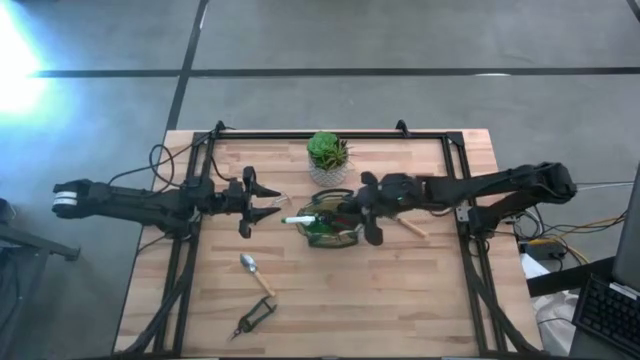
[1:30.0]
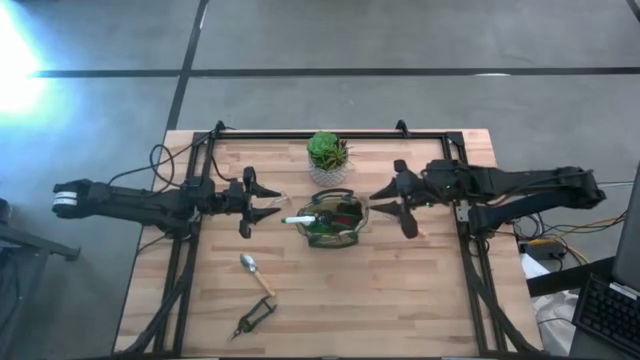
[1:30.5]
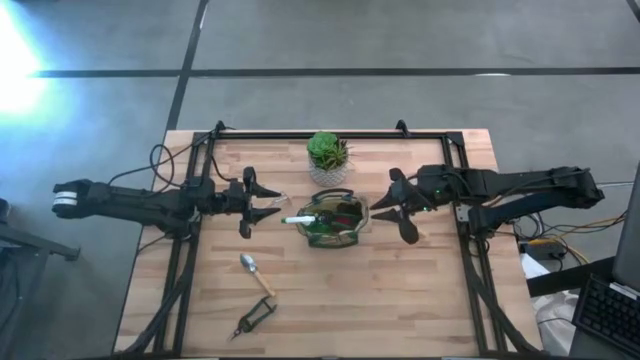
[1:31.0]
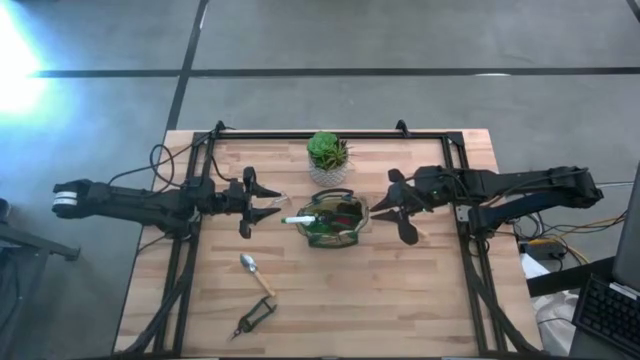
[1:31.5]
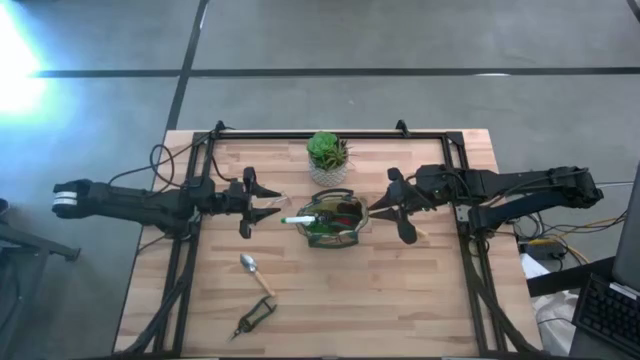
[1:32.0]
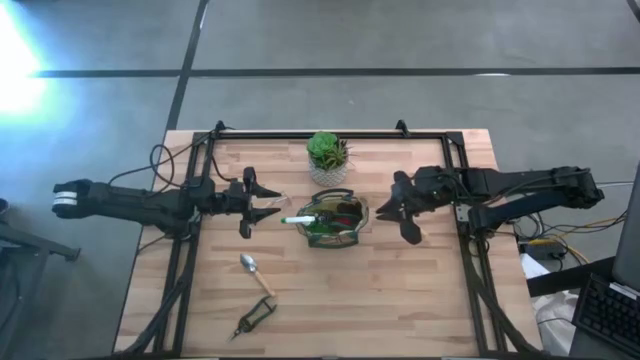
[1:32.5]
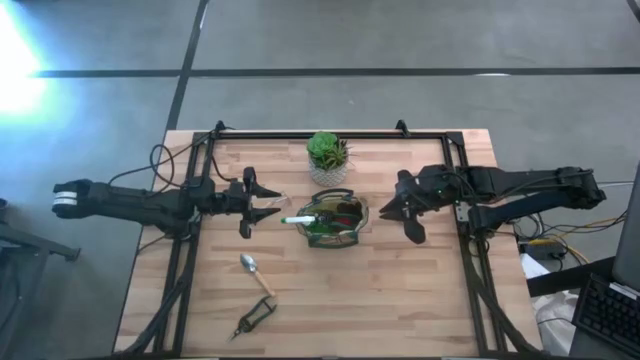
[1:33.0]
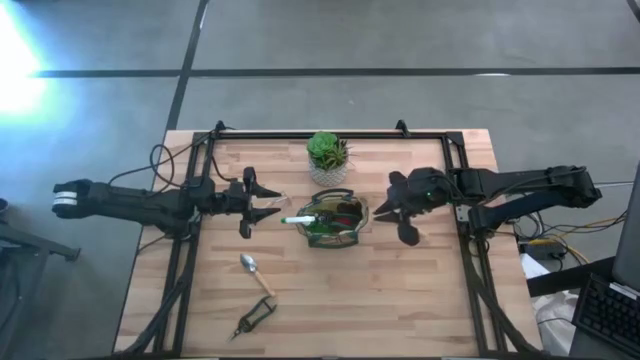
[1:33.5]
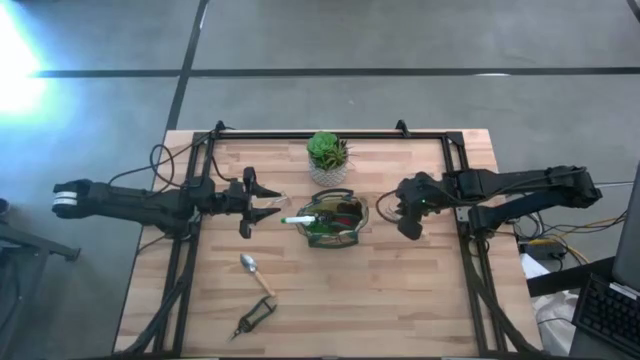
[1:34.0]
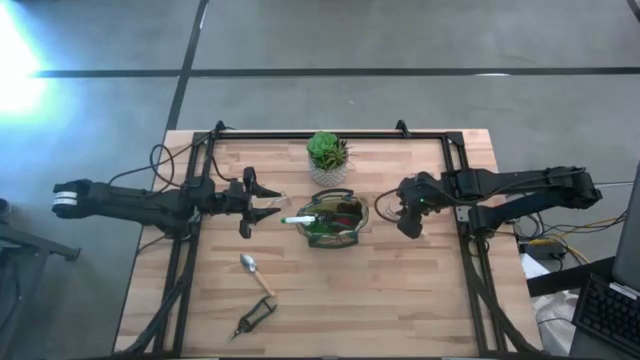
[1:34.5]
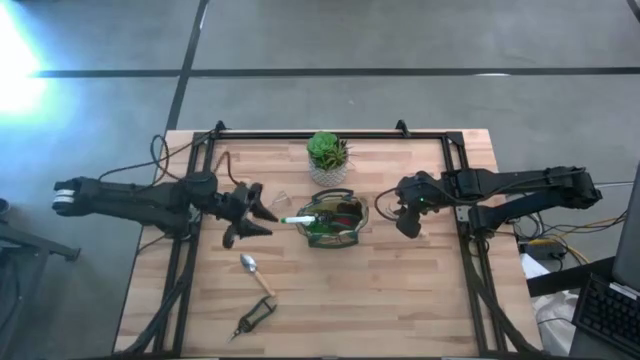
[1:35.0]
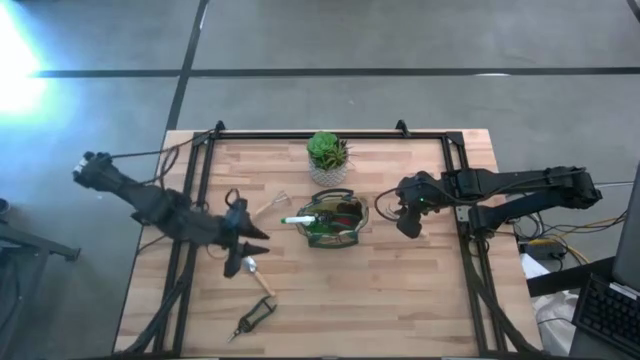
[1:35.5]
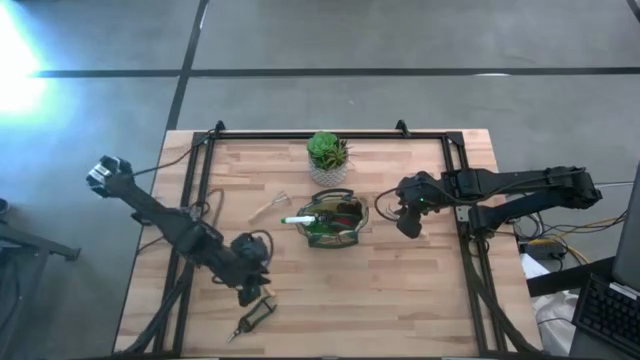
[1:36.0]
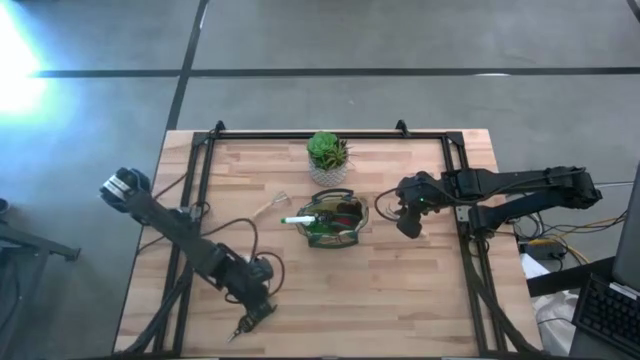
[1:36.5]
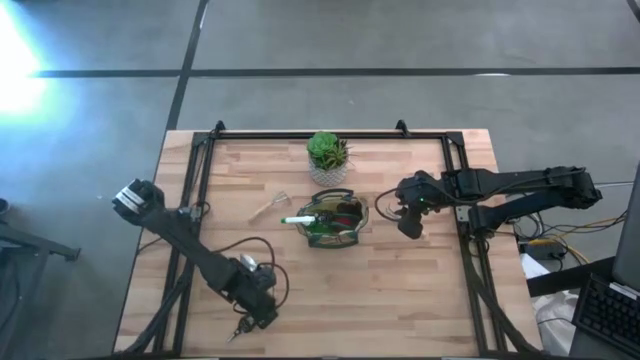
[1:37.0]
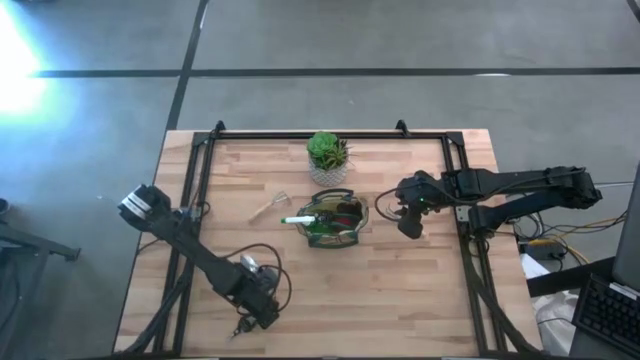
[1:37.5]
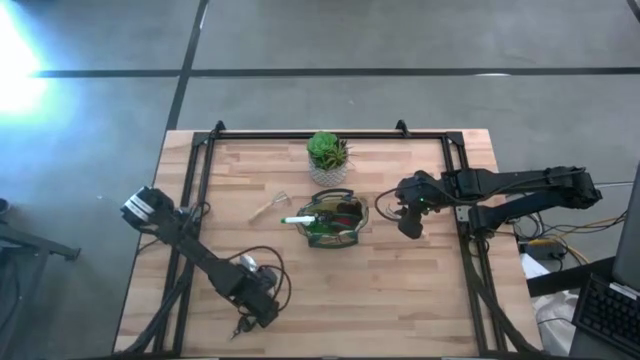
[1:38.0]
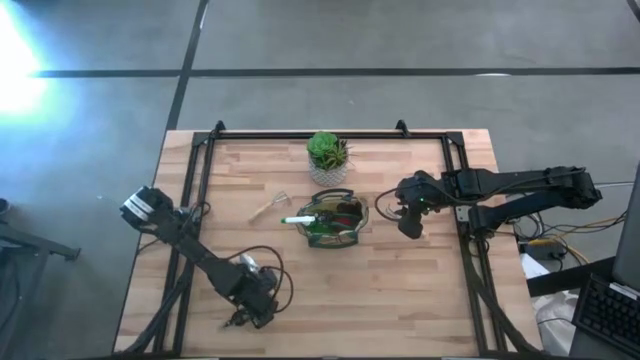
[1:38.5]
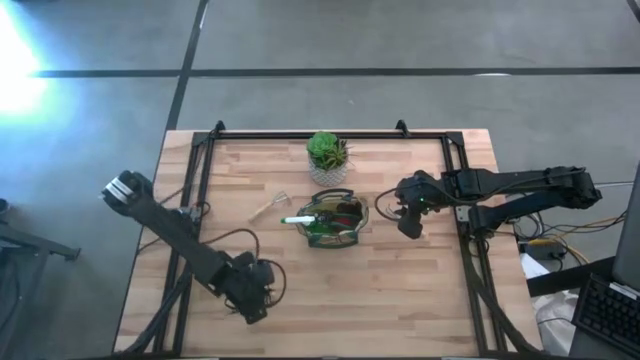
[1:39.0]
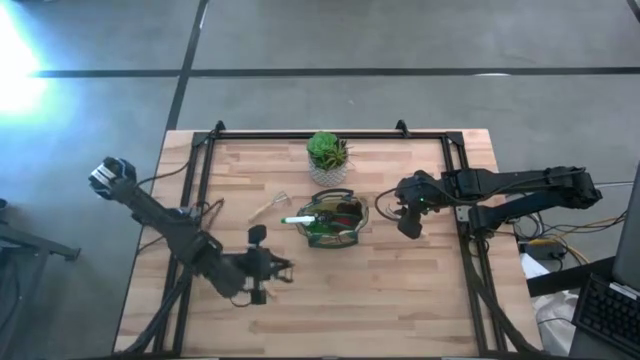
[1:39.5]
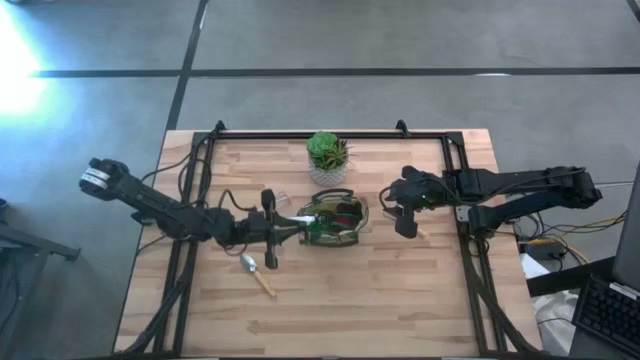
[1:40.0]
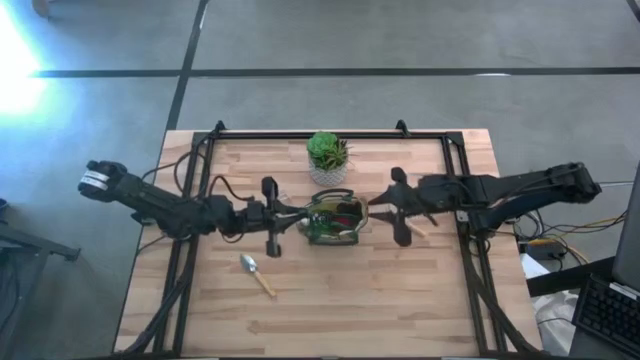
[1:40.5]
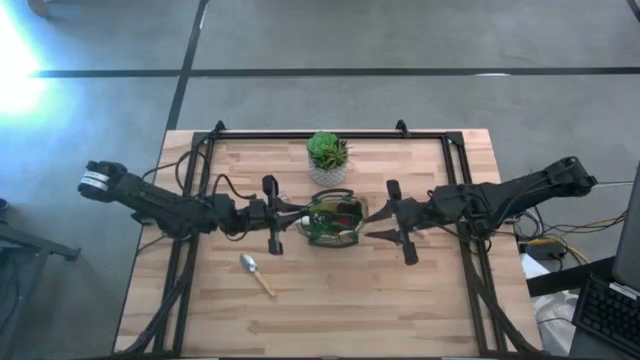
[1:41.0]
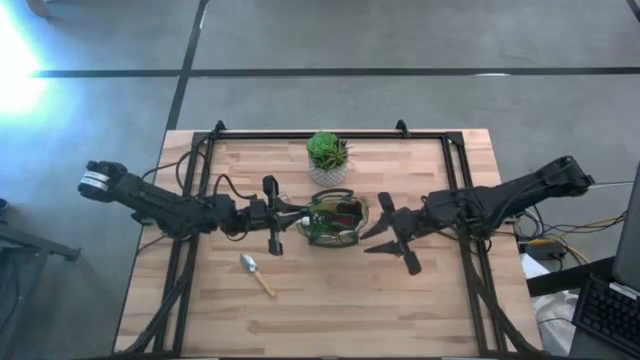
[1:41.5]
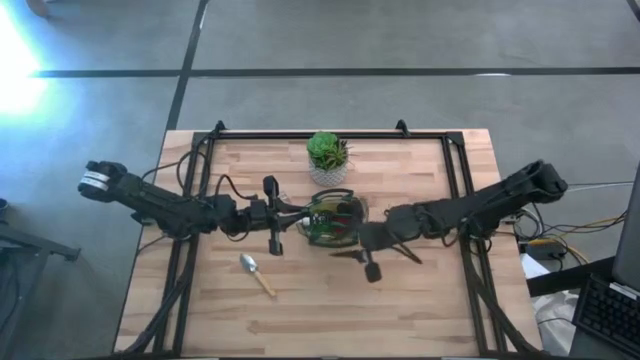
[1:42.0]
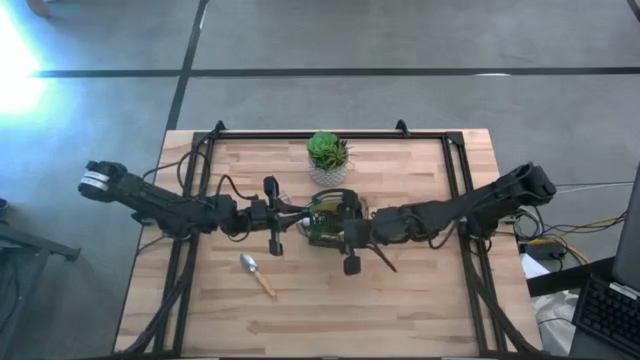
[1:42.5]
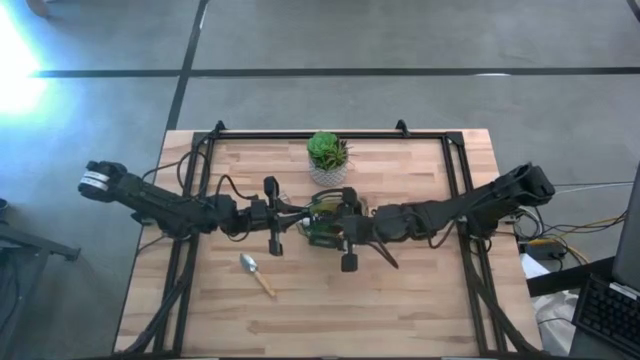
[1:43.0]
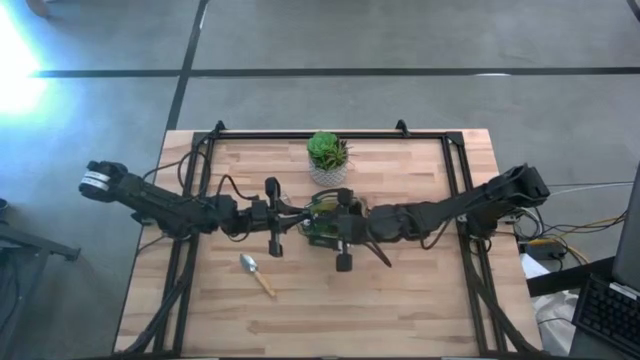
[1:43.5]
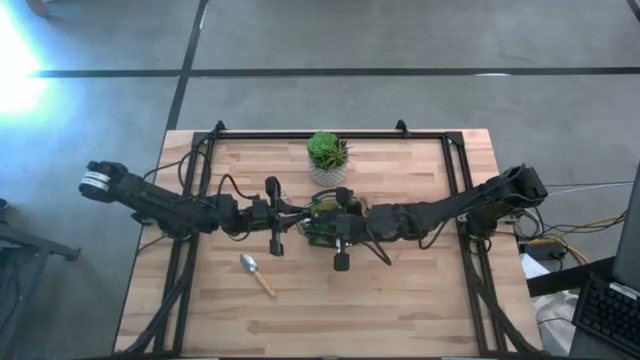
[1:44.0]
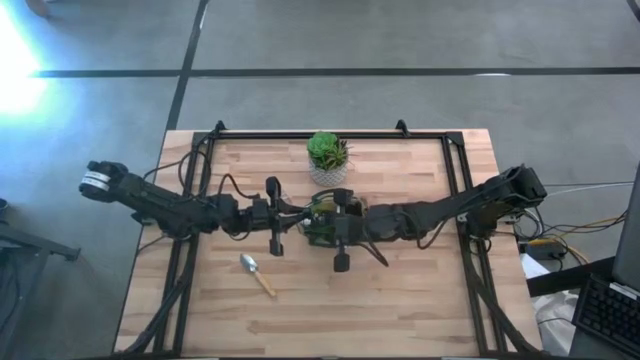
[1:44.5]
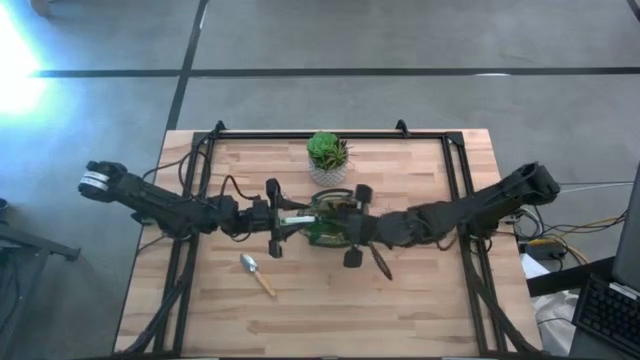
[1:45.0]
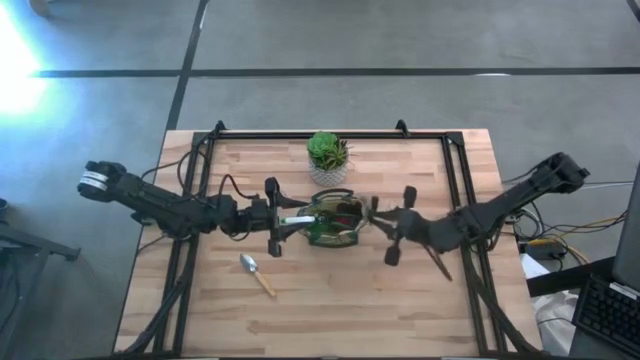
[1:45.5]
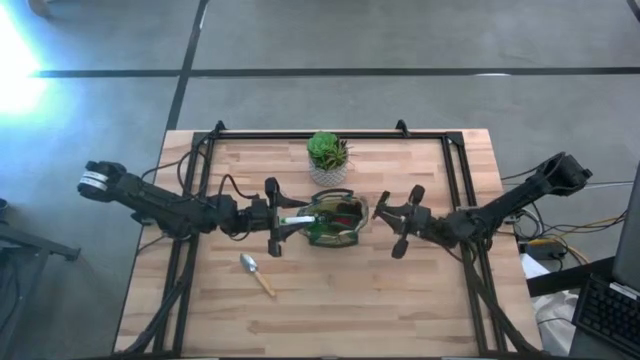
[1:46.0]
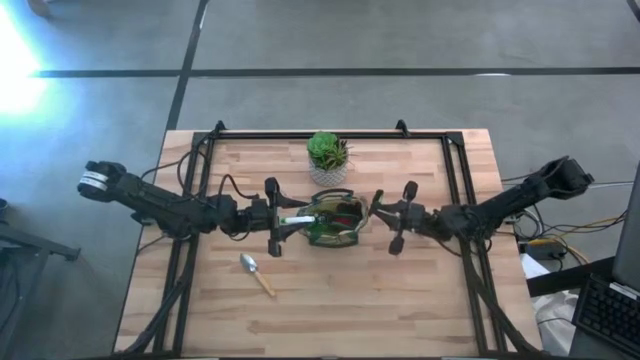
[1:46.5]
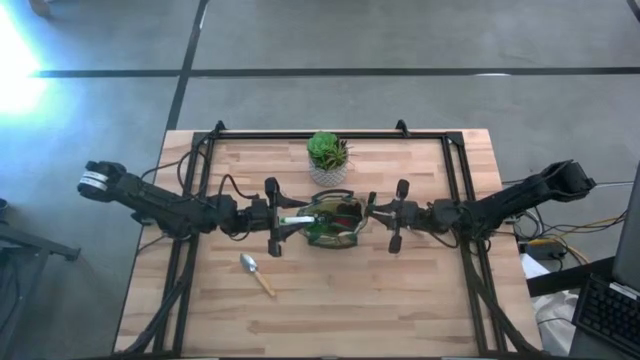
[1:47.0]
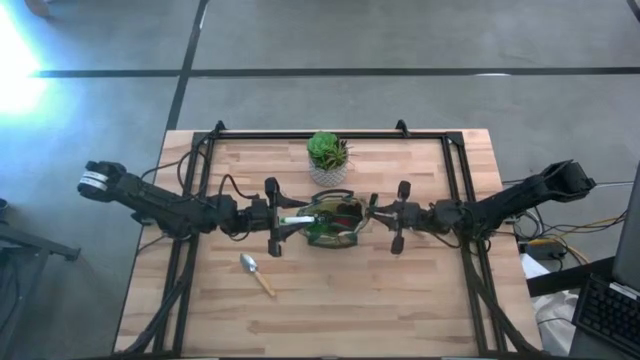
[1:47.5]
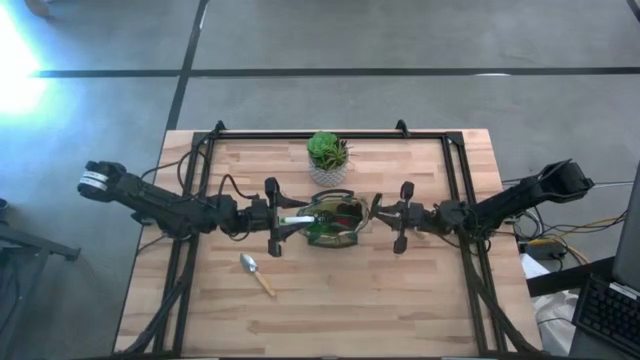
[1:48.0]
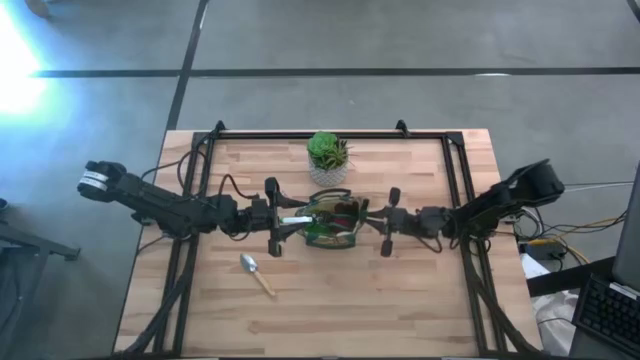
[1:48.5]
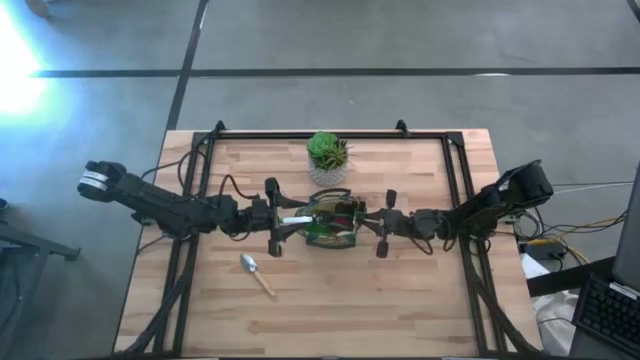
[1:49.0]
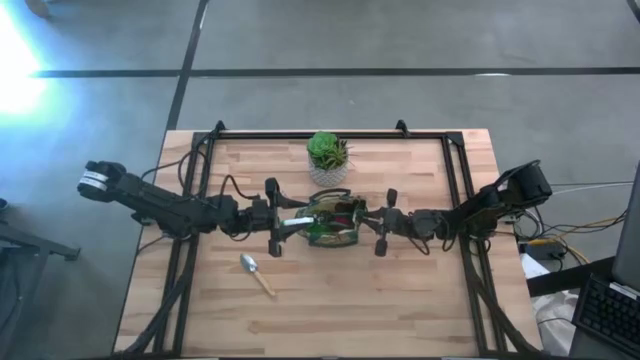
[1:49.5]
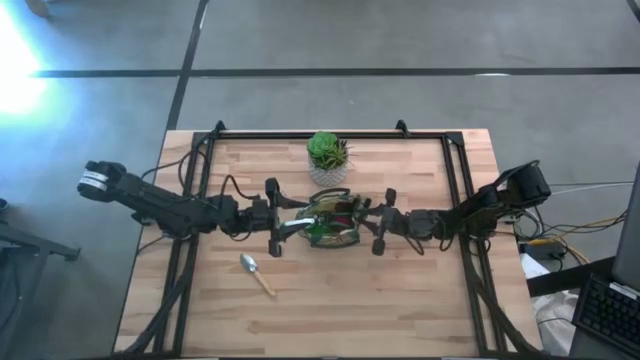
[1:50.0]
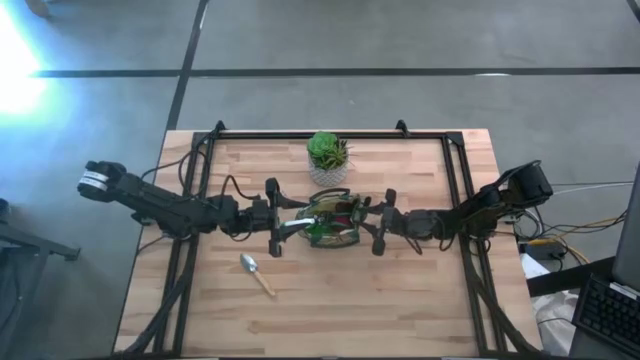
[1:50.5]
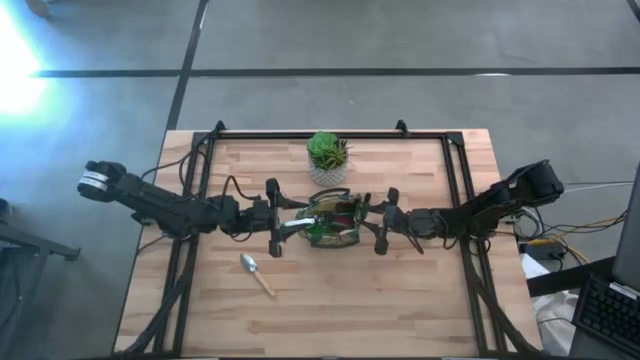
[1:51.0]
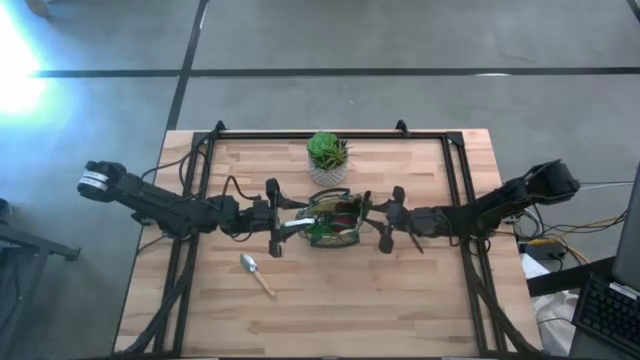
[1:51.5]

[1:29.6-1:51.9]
Task: Pick & Place Garden tools in Gardening bag
Put the green shear scissors into the gardening bag
